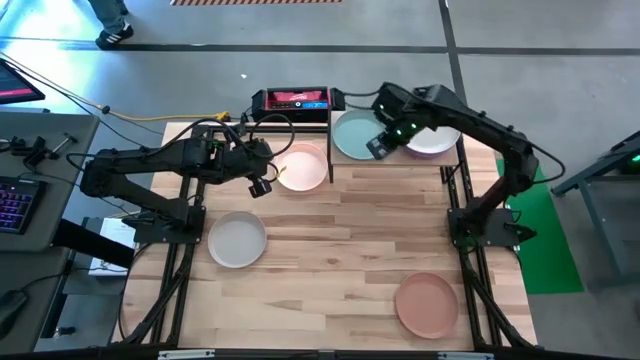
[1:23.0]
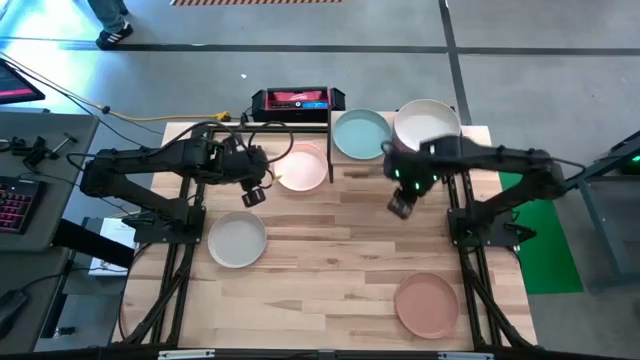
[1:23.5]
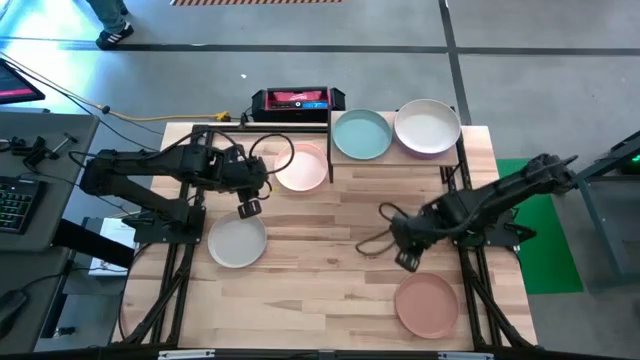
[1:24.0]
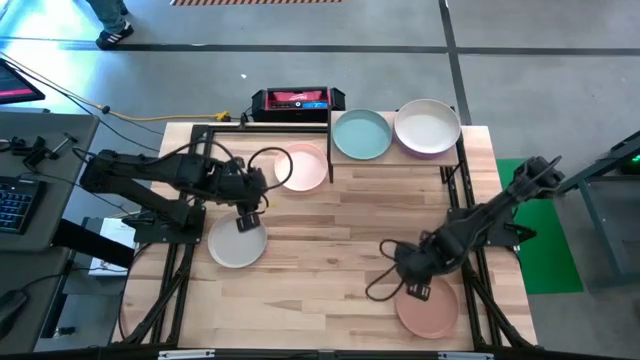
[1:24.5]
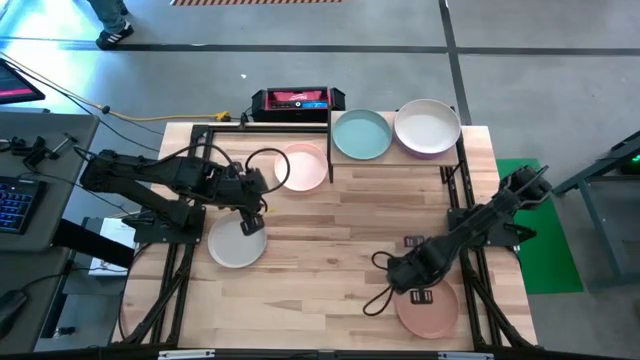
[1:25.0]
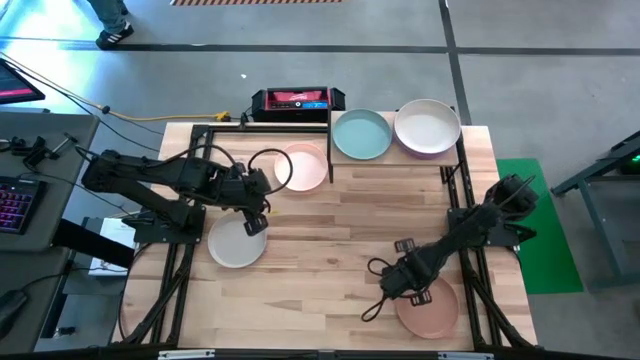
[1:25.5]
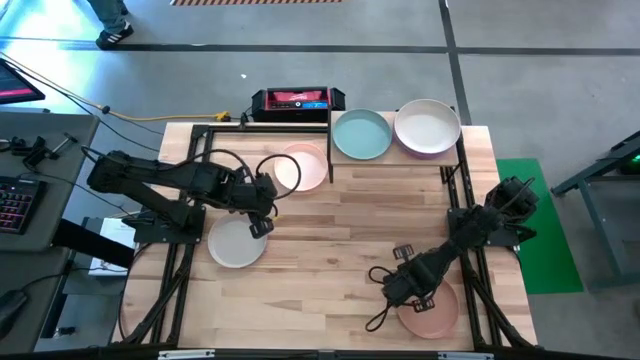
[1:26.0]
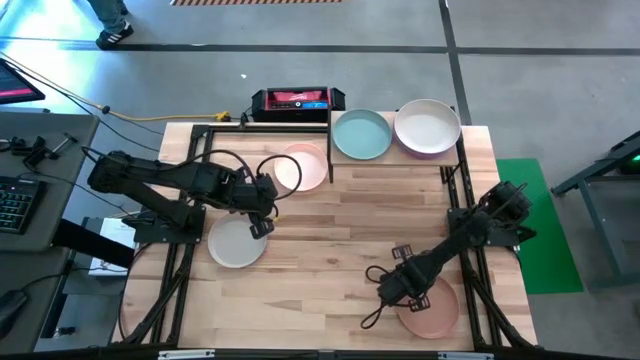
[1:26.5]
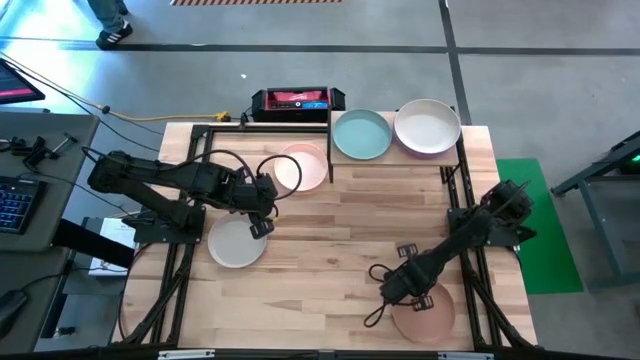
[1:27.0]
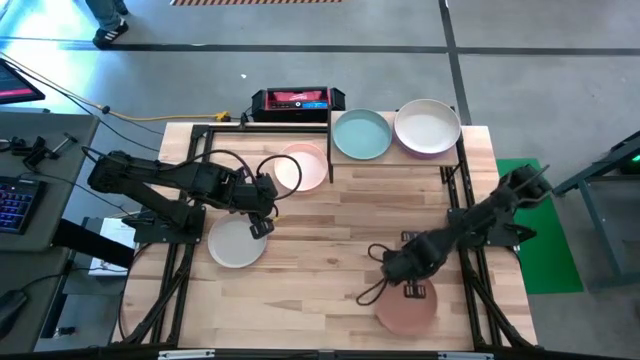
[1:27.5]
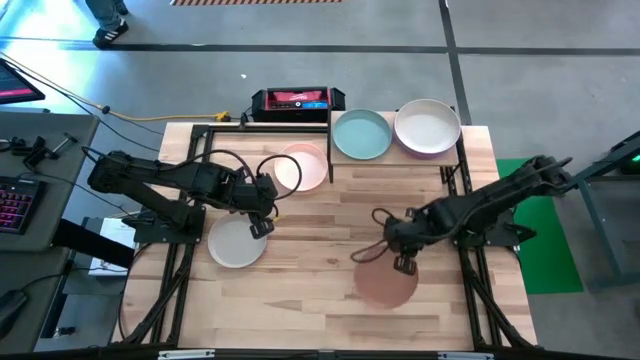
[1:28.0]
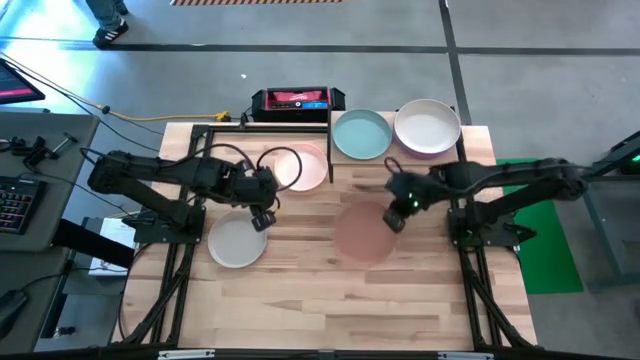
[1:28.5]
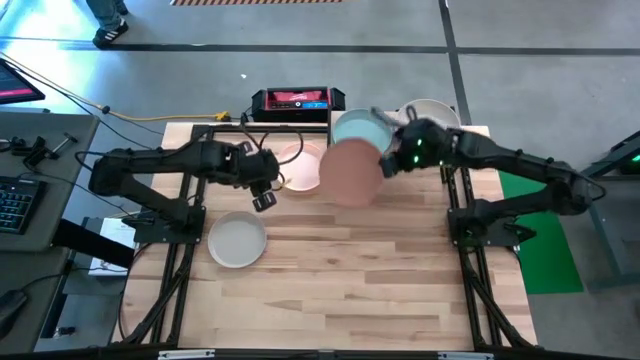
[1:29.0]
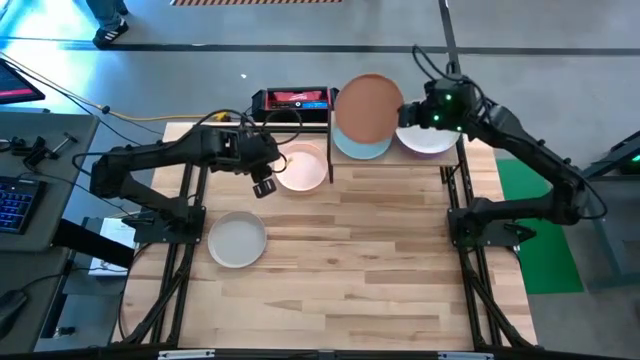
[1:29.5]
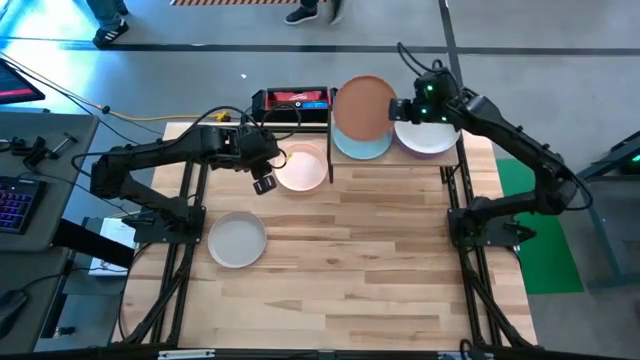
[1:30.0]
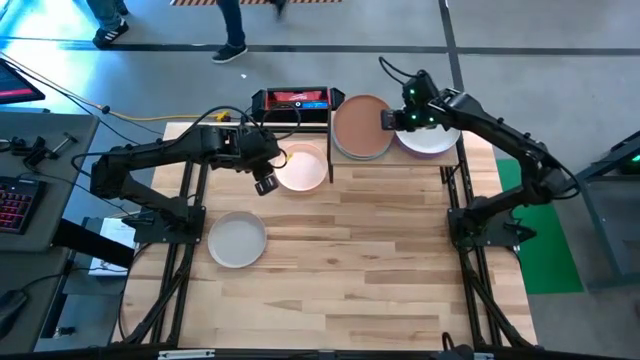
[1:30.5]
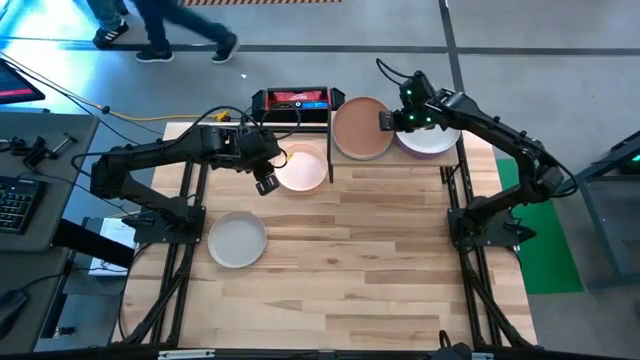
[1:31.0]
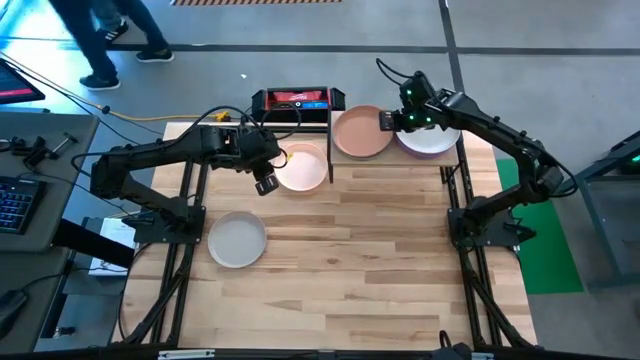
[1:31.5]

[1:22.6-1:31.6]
Task: Place and stack plates onto a shelf
Stack the brown plate on top of the light blue plate on the shelf

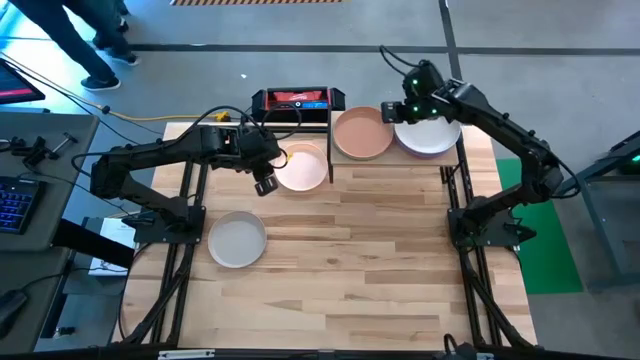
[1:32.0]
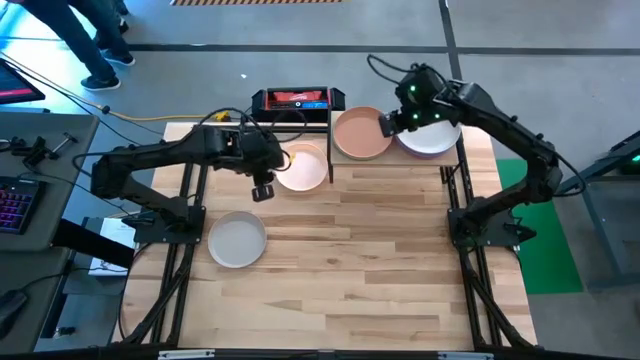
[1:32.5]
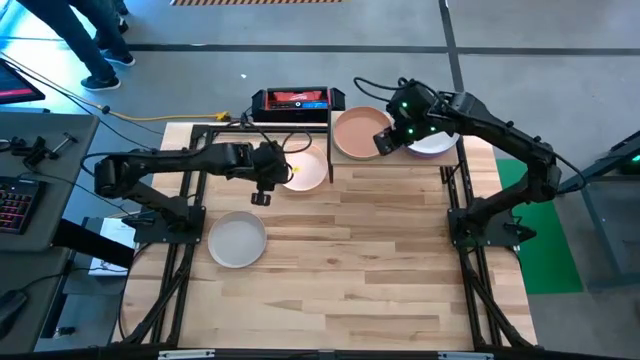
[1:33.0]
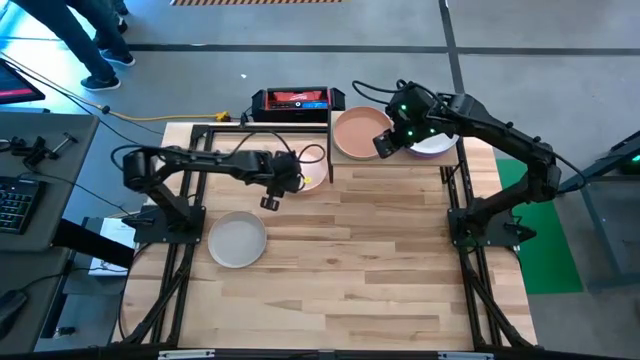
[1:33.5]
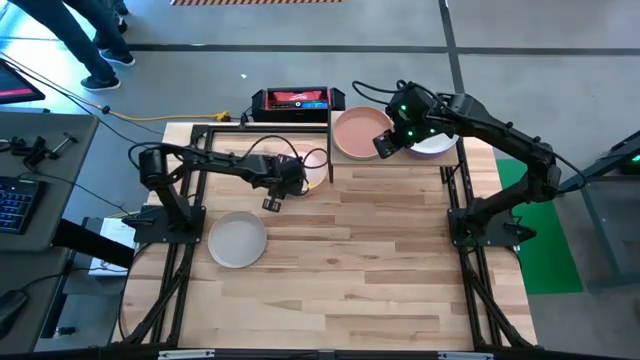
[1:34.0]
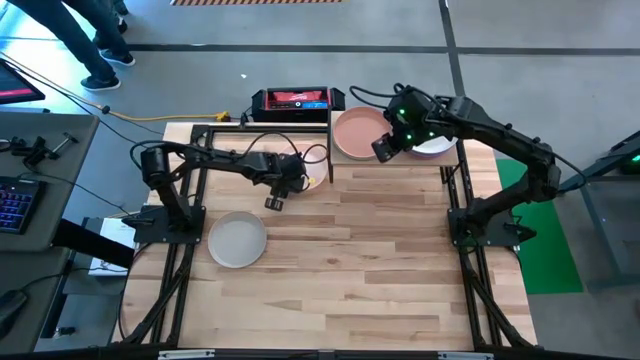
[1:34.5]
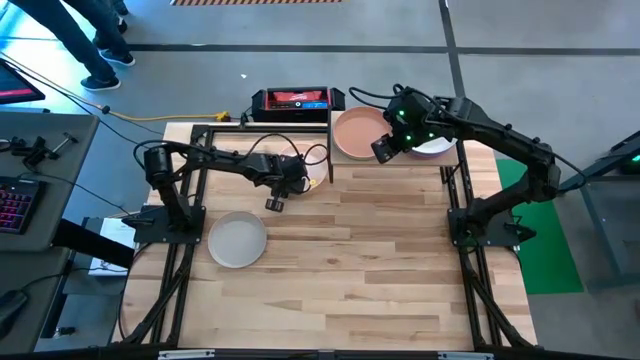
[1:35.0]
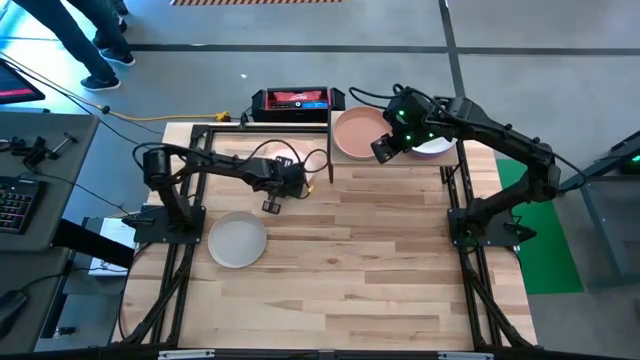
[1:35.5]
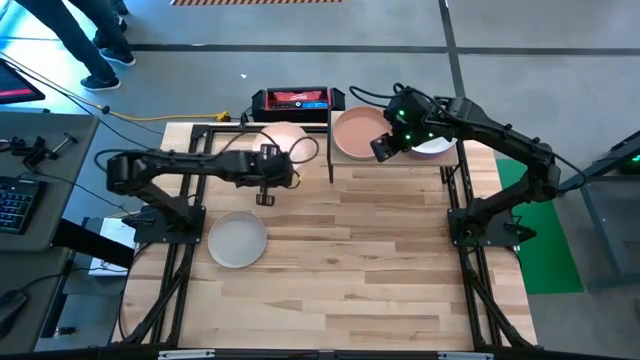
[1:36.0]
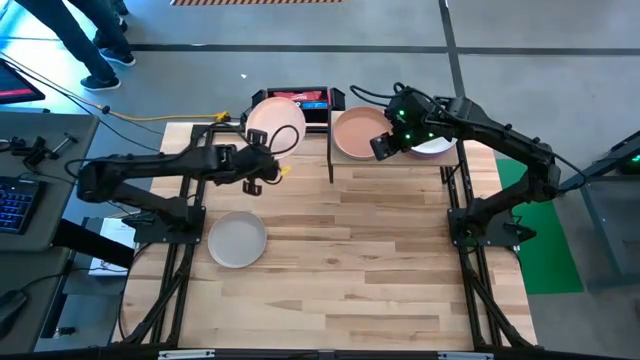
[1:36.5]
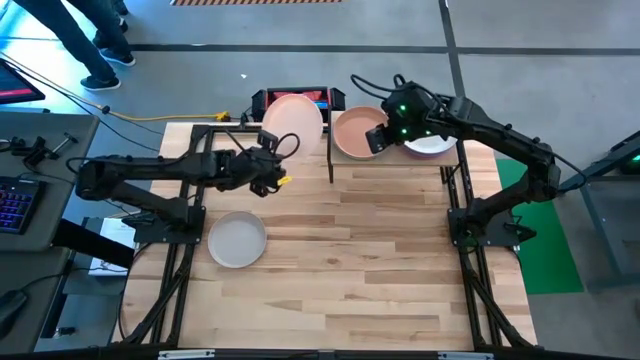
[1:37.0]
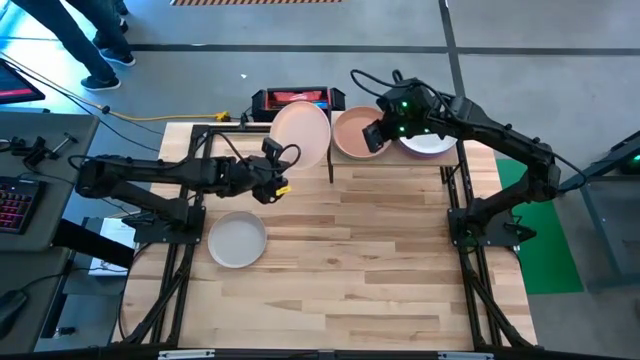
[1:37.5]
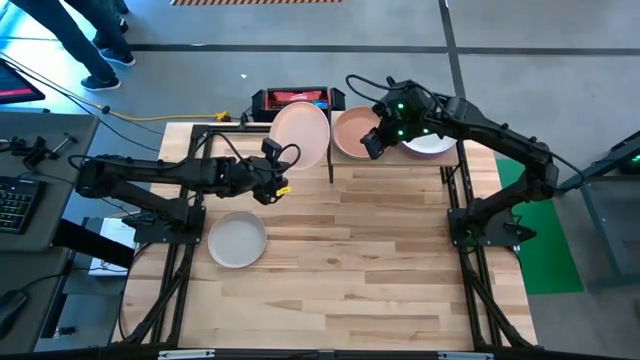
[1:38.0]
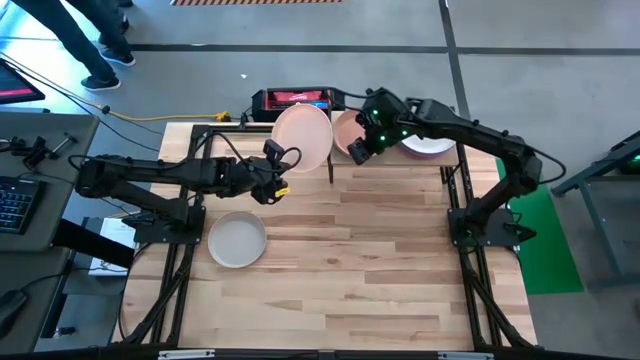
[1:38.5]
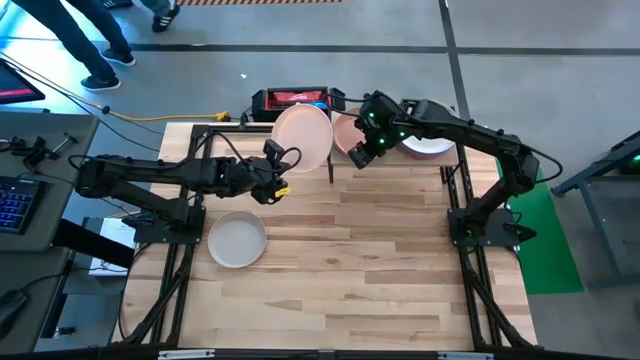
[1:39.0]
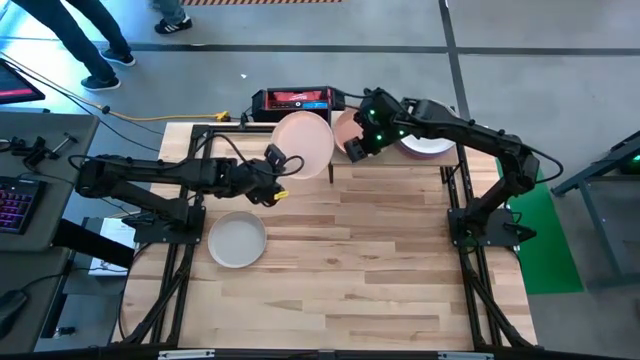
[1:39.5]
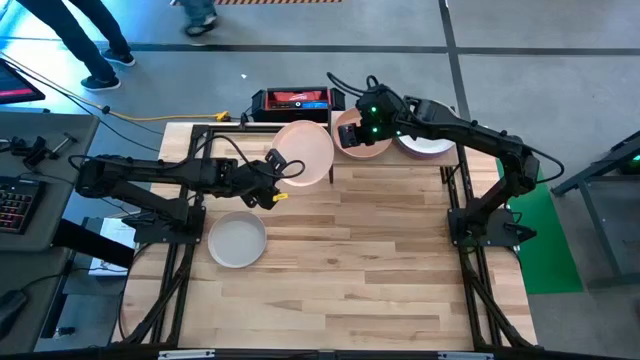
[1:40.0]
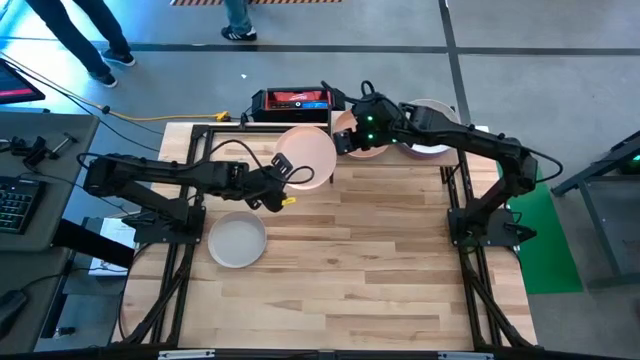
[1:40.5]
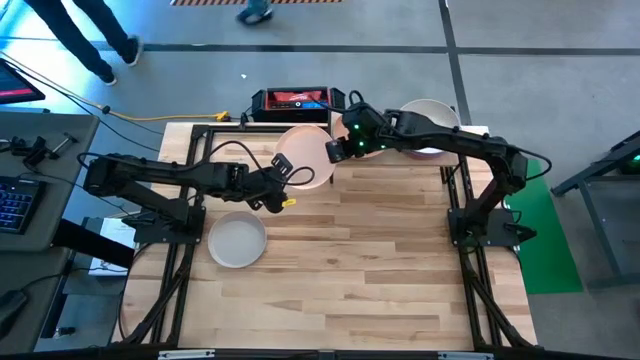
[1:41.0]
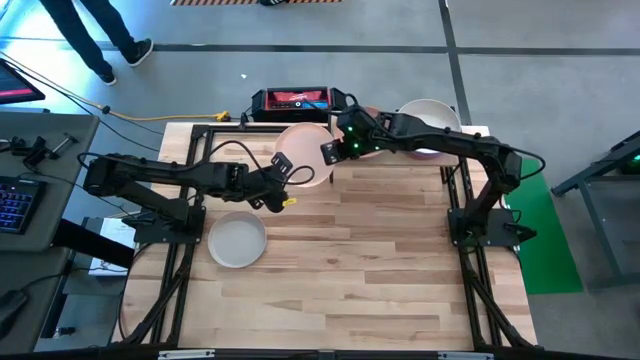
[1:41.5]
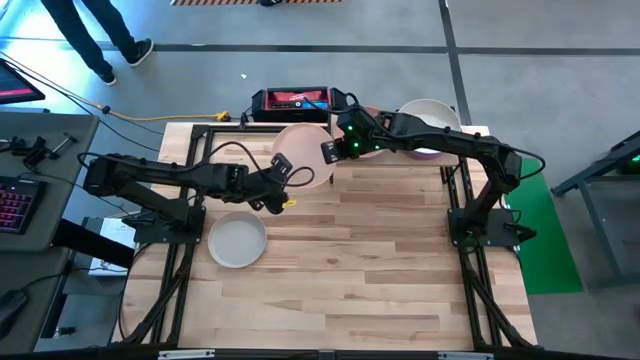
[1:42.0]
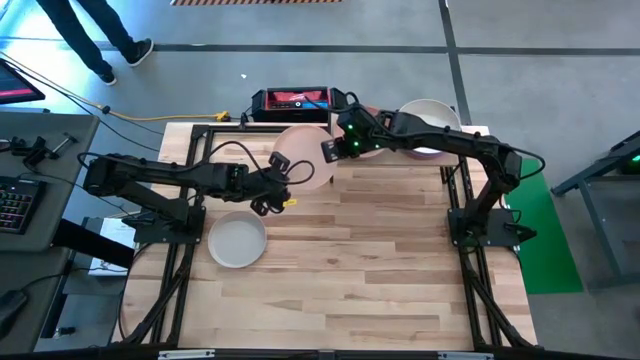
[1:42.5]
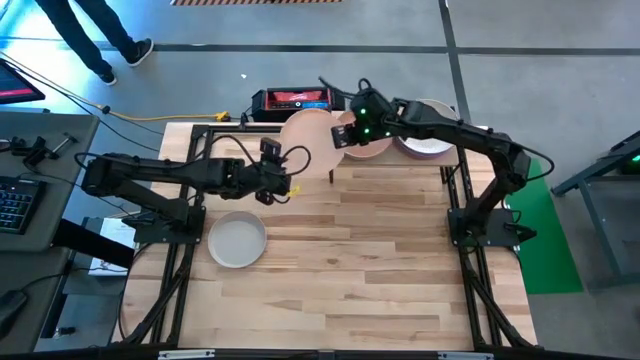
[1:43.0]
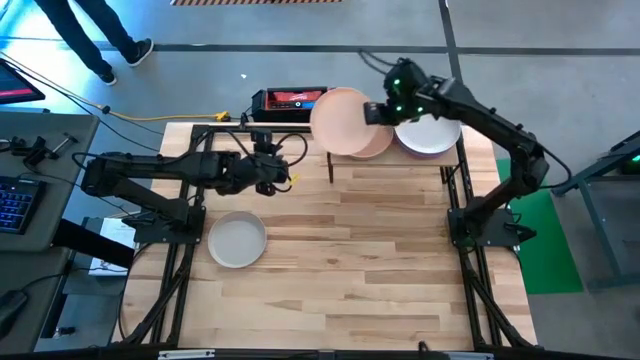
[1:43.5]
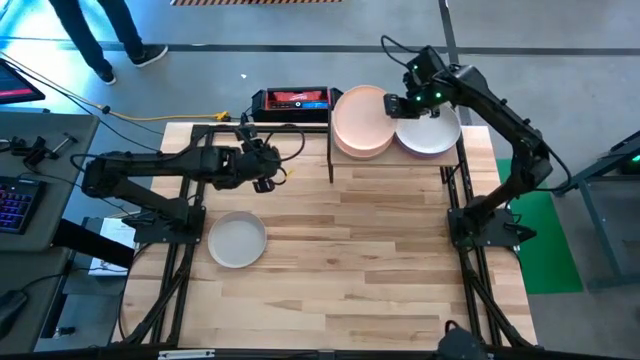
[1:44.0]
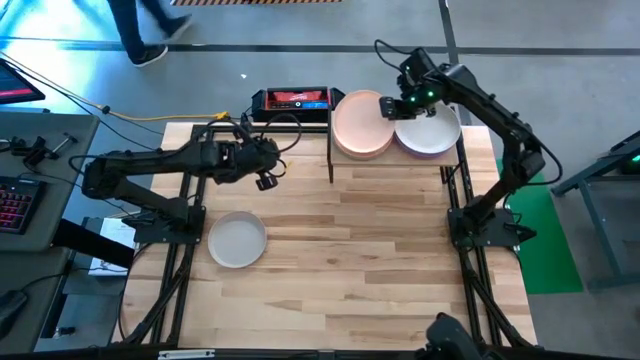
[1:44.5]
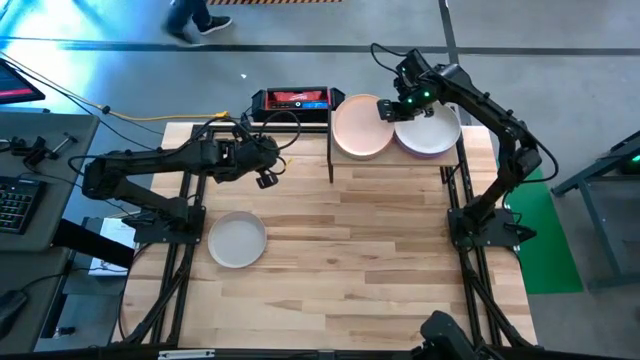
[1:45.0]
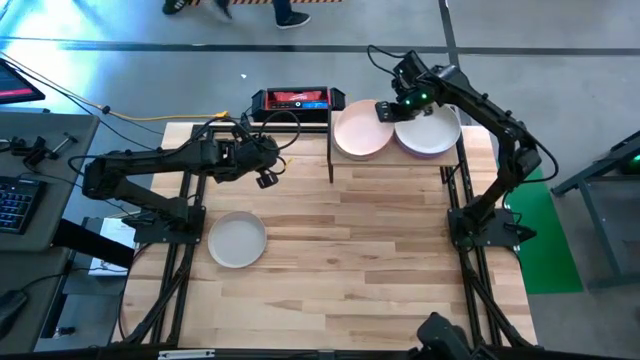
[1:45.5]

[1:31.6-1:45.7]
Stack the light orange plate on top of the brown plate on the shelf
